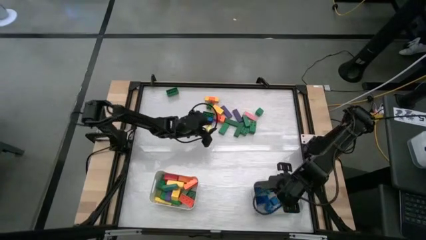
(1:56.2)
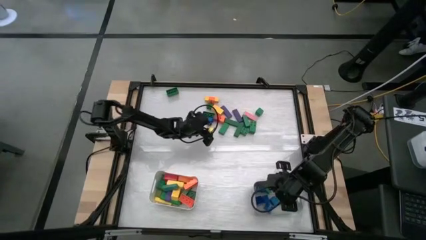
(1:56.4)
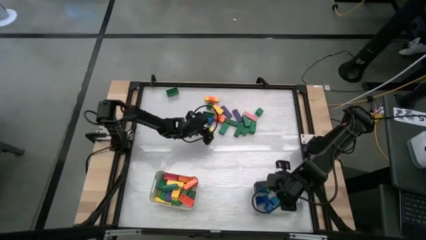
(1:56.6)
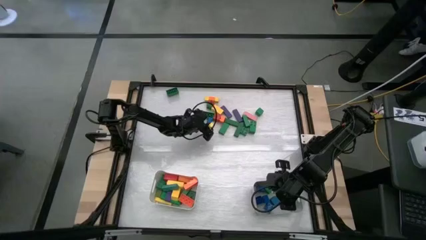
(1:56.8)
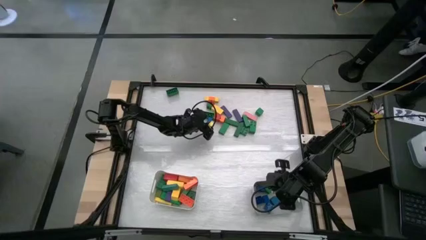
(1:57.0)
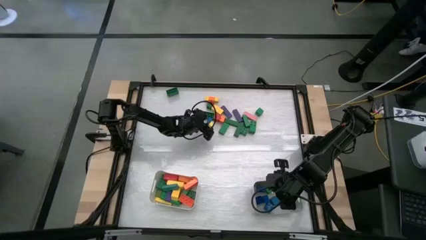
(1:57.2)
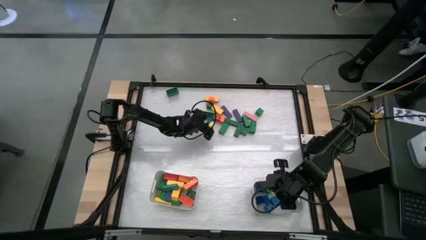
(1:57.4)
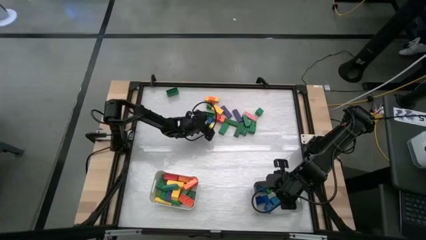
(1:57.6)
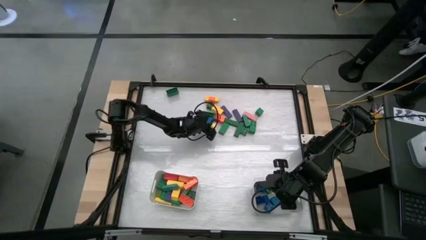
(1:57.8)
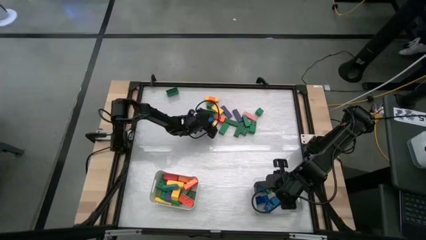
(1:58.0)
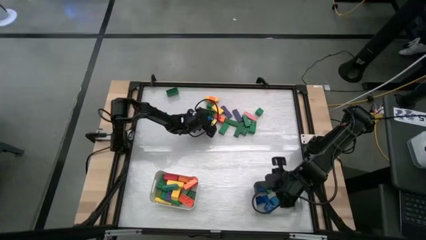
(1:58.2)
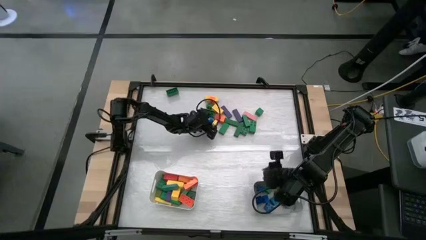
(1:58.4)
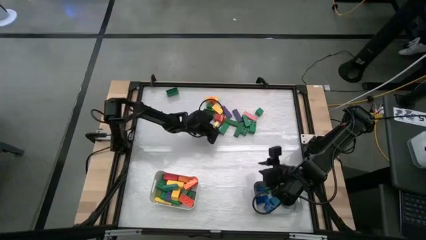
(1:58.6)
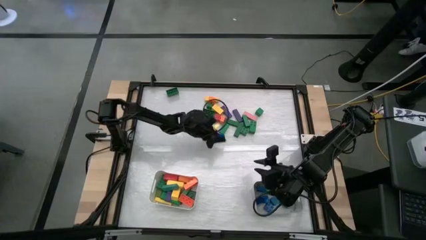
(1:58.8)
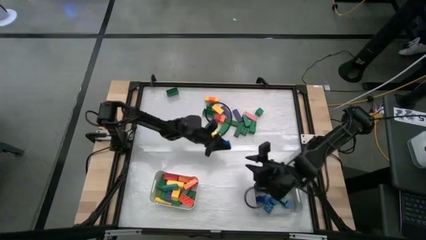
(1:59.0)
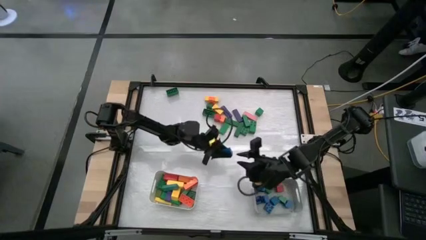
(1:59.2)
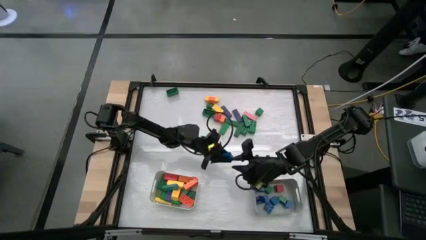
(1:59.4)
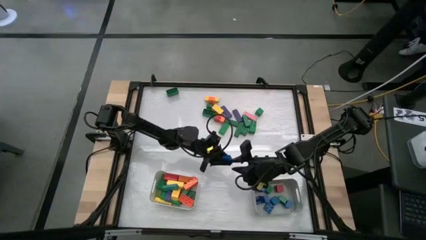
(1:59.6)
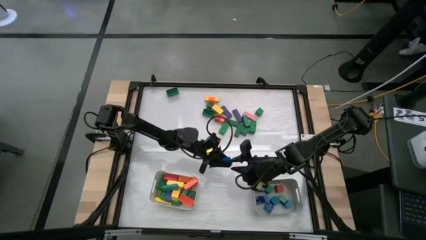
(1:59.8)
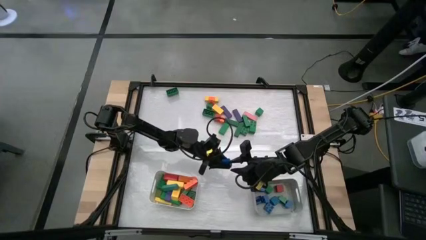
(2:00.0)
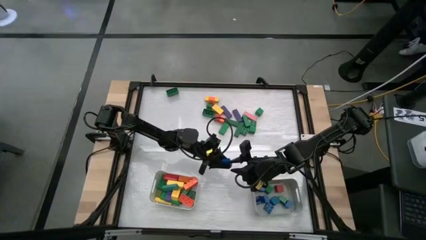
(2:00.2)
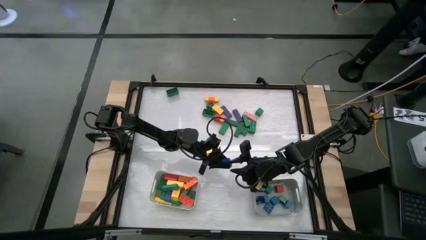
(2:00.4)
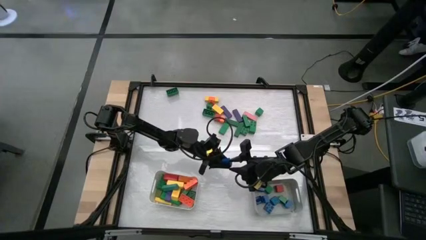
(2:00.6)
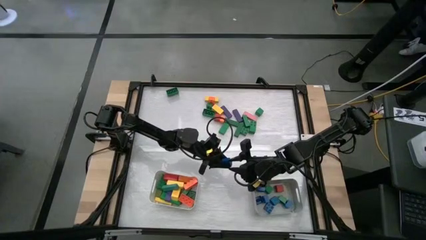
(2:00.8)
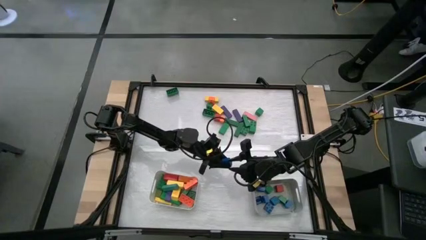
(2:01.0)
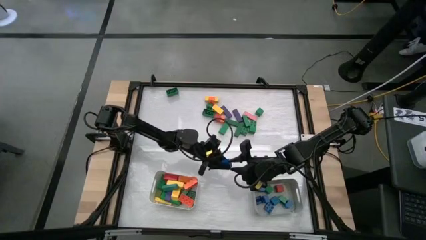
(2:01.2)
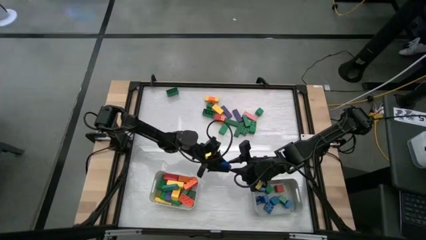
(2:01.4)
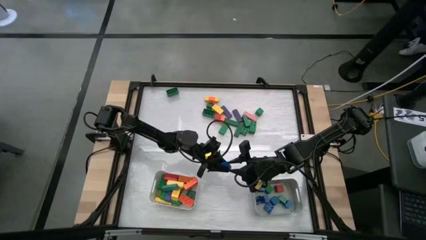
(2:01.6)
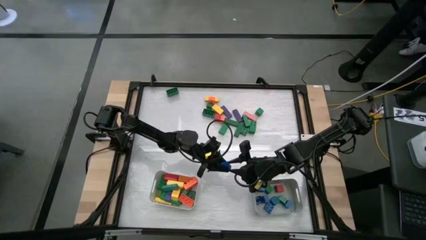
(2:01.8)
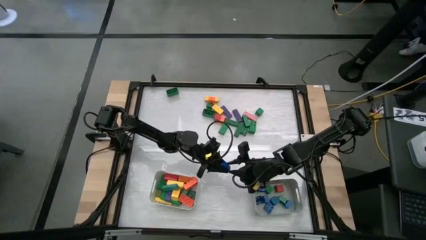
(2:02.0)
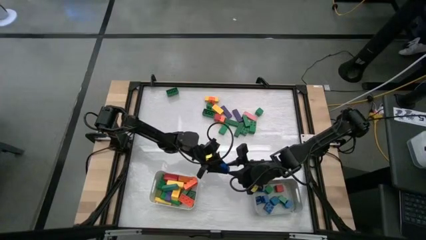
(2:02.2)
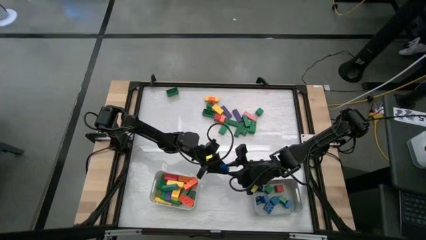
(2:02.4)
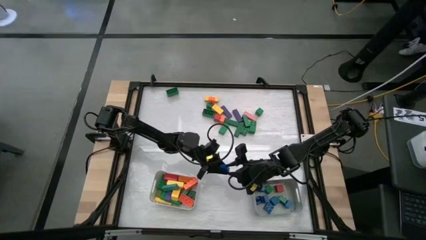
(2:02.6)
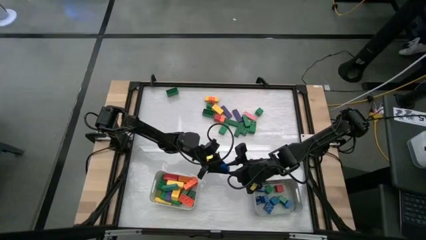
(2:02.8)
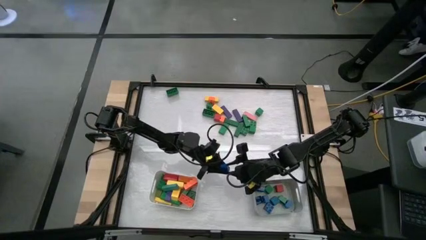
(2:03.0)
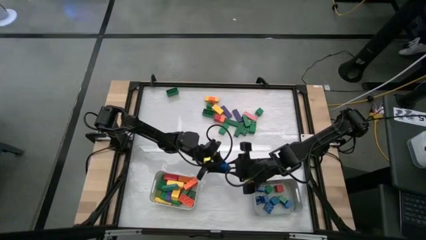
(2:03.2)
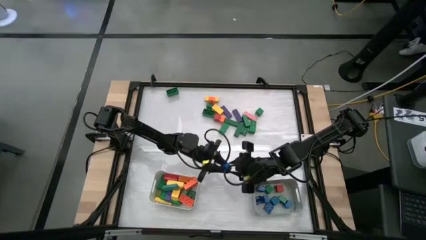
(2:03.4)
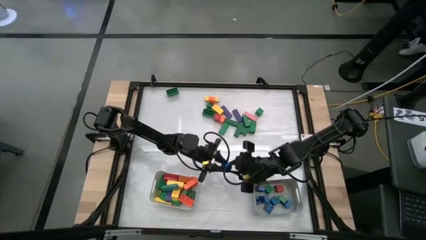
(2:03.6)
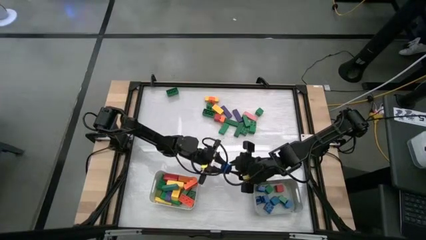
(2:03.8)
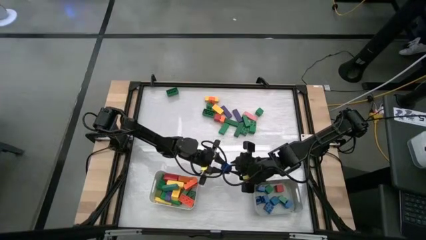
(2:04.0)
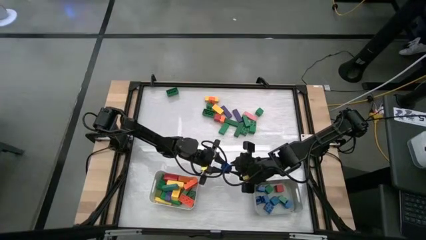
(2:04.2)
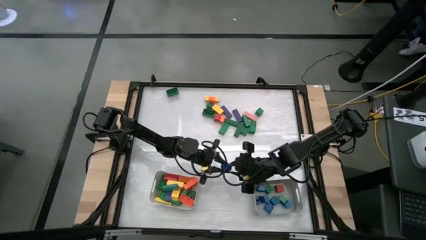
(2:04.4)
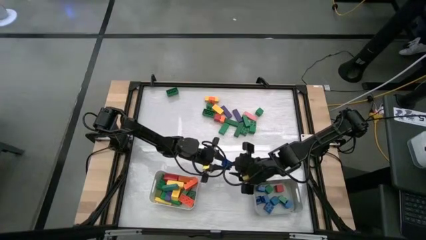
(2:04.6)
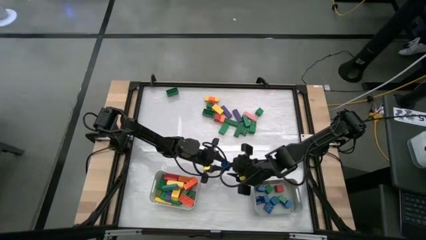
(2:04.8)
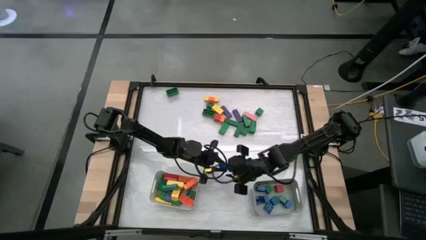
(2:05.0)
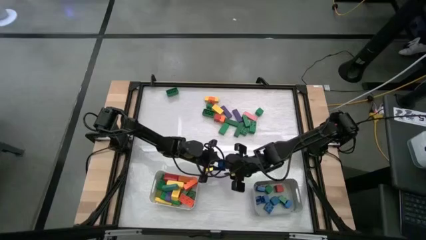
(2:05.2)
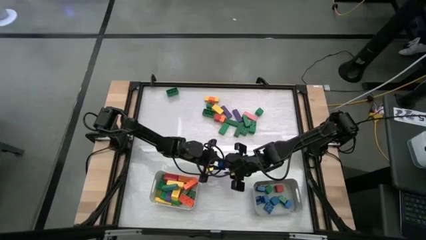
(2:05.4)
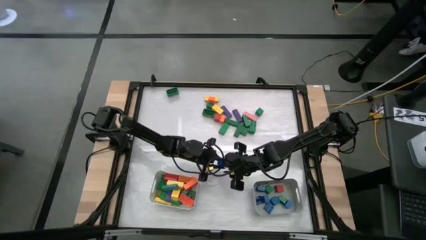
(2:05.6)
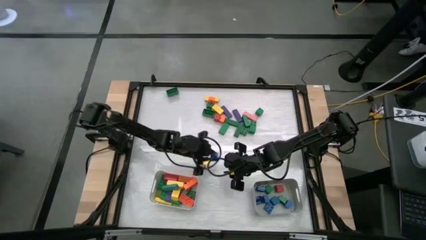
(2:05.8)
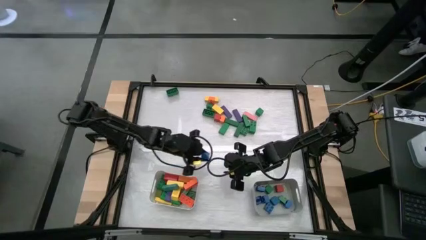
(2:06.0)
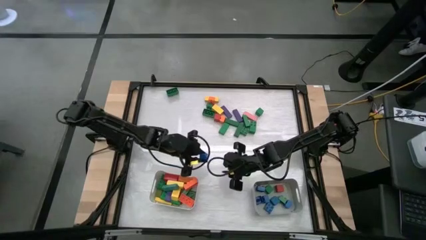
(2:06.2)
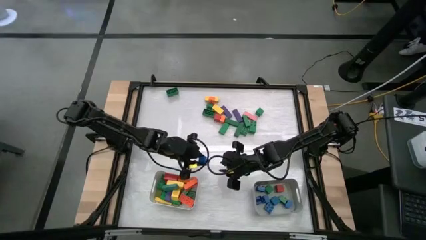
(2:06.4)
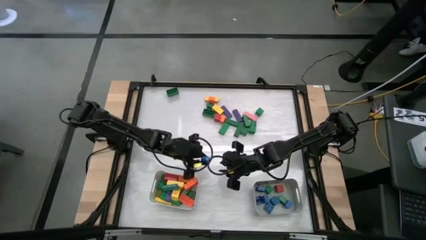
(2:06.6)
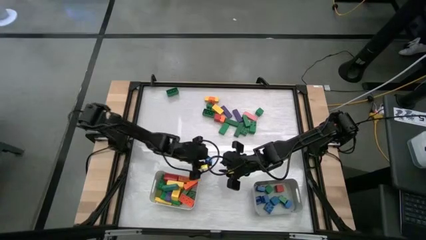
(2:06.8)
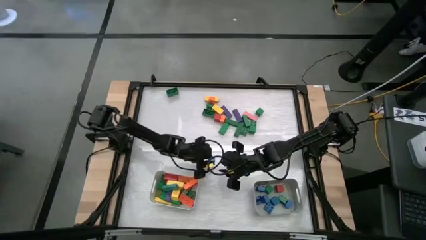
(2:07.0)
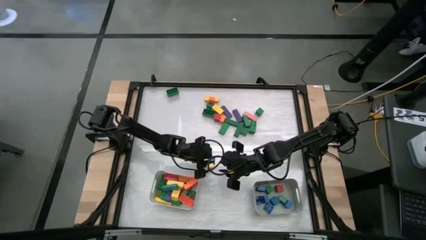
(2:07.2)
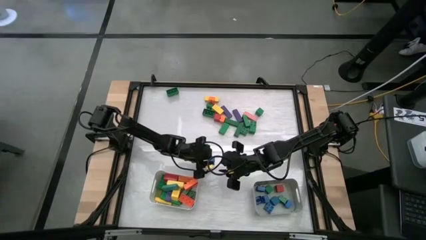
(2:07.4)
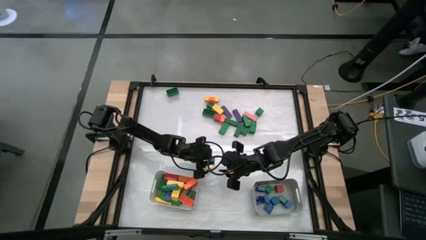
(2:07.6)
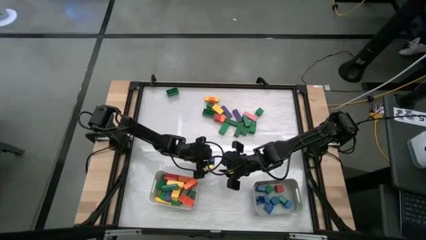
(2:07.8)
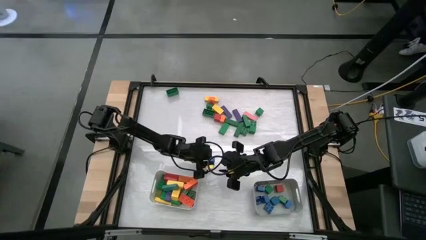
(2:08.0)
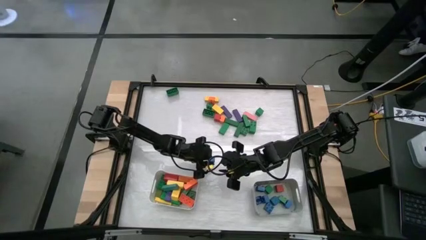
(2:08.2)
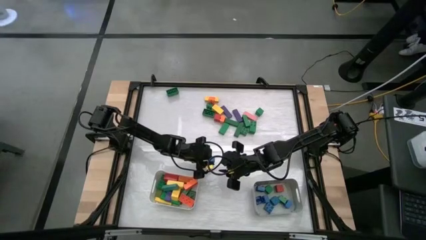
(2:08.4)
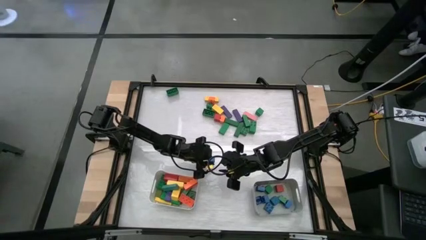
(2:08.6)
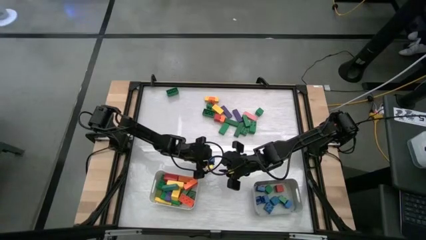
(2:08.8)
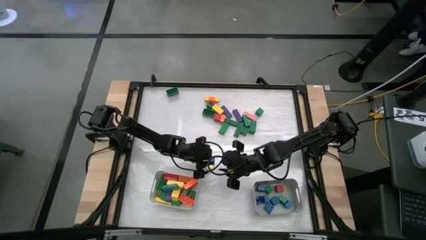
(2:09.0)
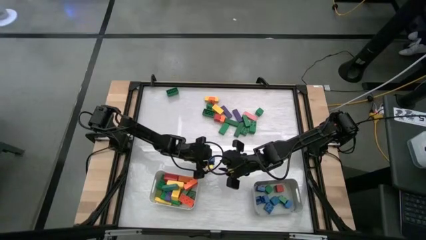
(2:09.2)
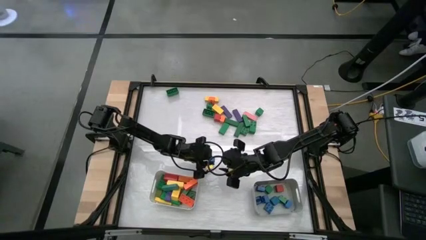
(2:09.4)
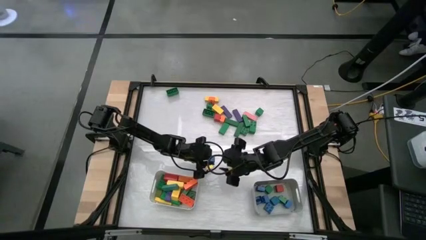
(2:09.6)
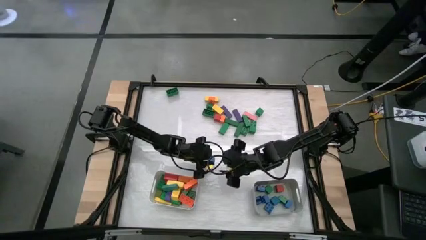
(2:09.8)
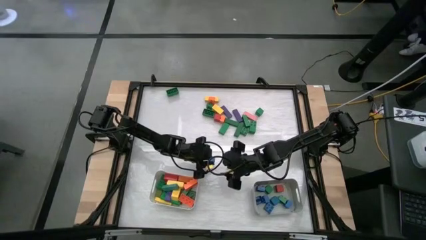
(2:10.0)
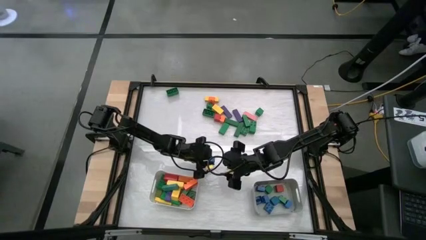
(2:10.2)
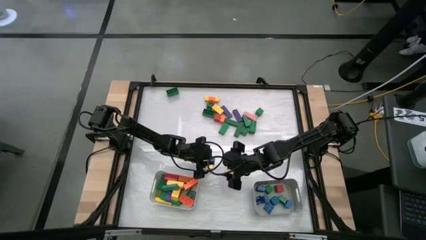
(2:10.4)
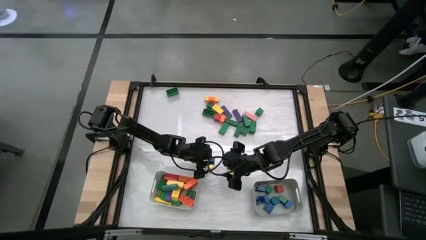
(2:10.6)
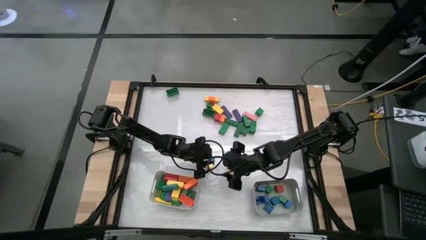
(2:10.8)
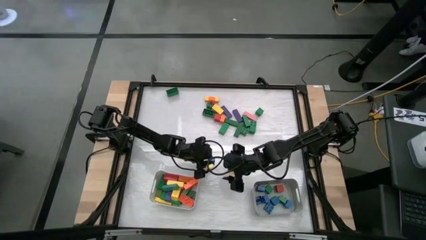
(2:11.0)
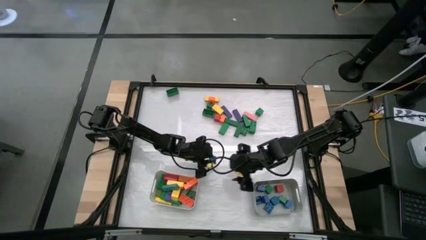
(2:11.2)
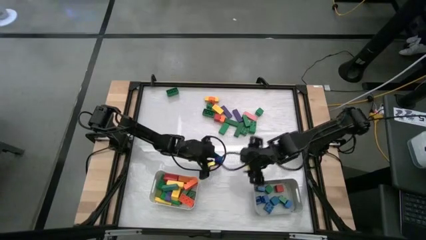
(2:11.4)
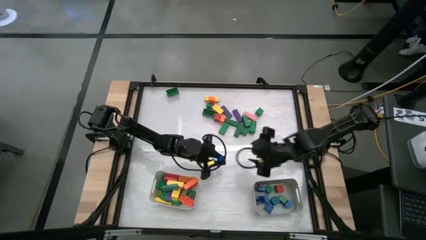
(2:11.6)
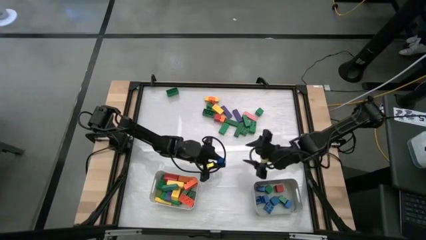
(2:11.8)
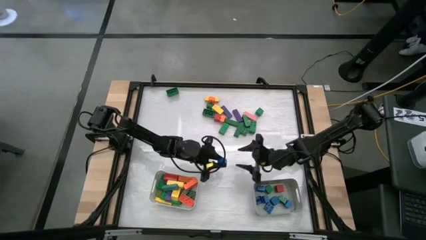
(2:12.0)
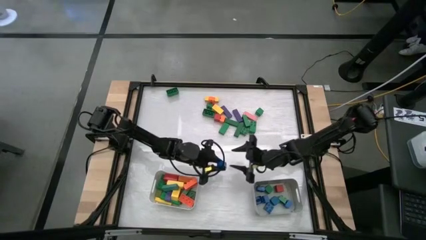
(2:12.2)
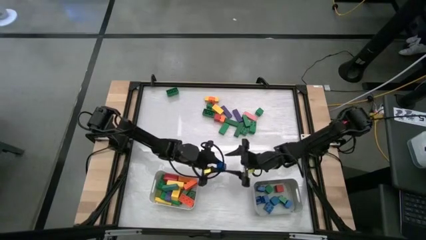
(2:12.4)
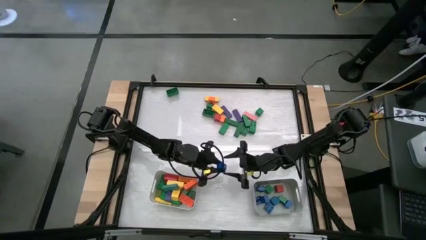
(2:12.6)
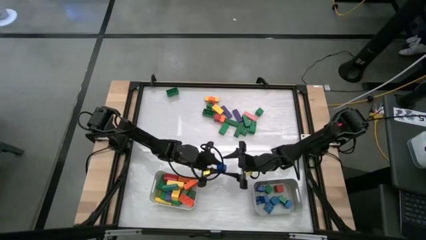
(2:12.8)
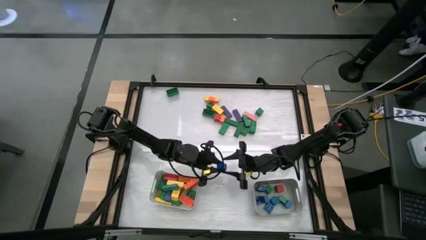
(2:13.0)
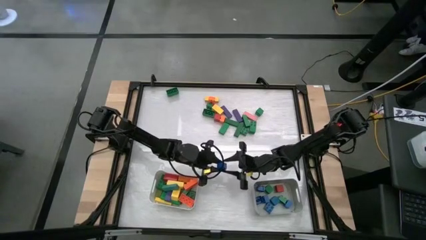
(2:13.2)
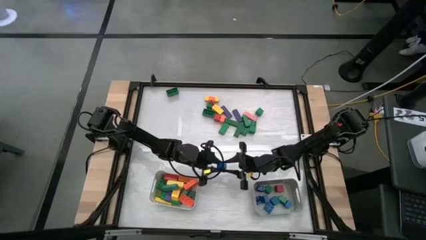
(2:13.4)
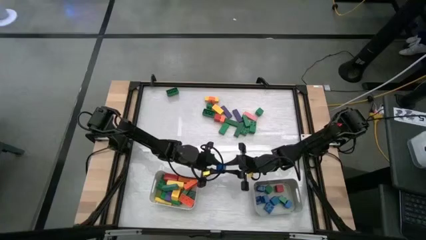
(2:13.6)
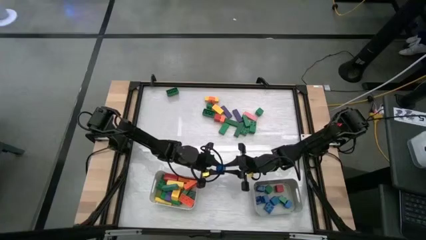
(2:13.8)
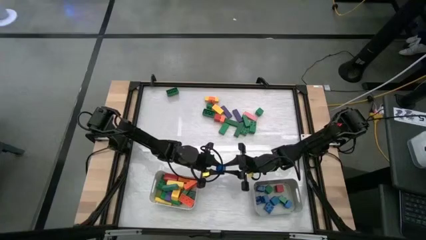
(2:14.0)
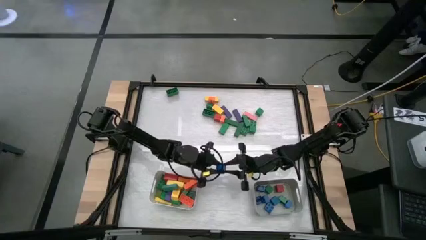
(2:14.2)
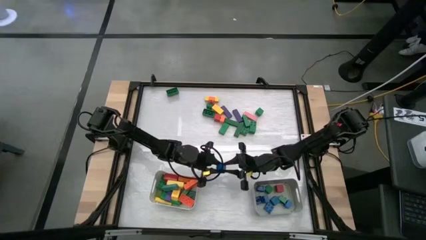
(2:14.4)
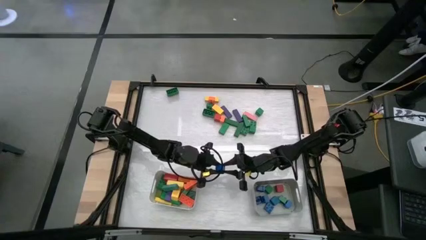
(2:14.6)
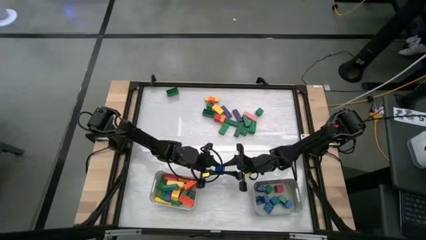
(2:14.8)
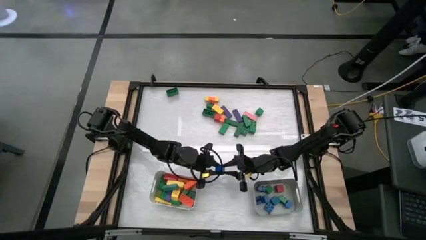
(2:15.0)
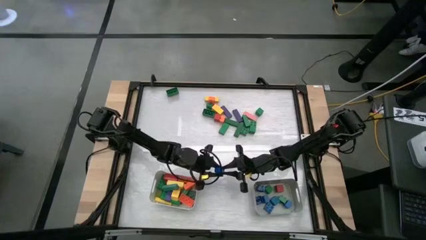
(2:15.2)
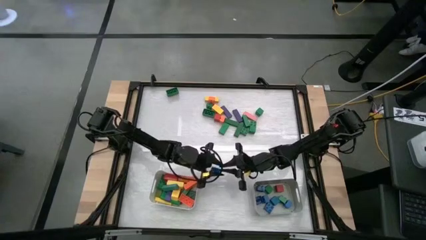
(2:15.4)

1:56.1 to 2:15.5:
Task: Sort blocks by size
Put the square blue game piece into the gray bin
